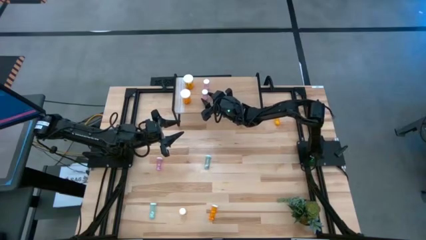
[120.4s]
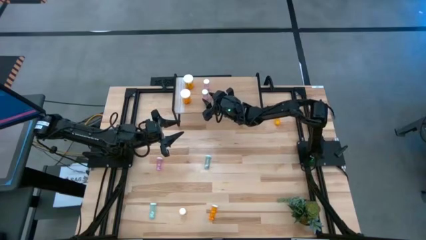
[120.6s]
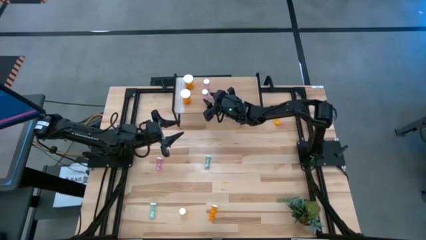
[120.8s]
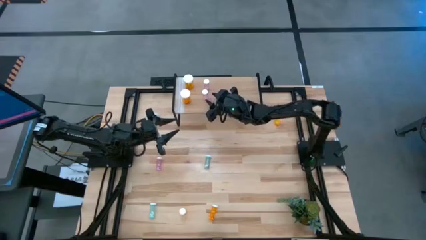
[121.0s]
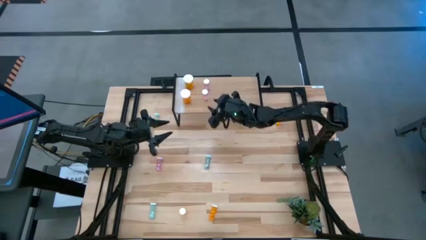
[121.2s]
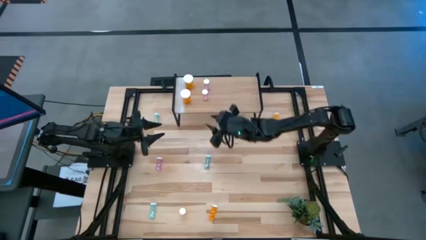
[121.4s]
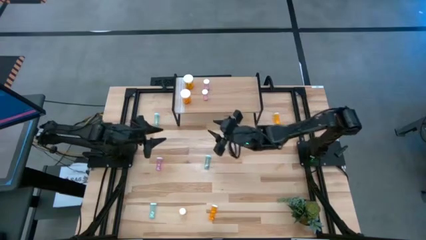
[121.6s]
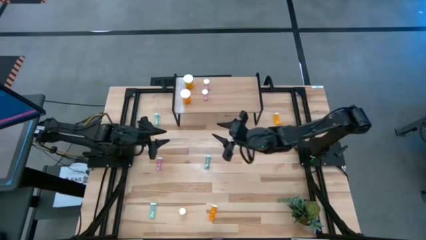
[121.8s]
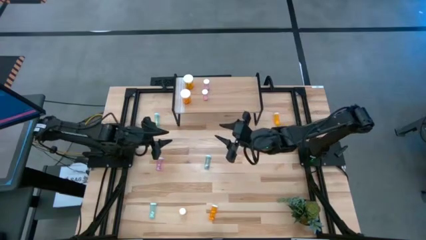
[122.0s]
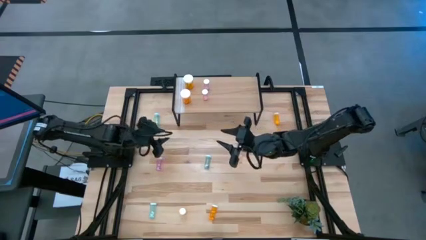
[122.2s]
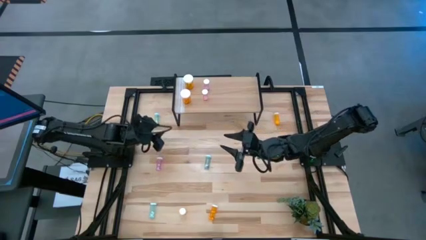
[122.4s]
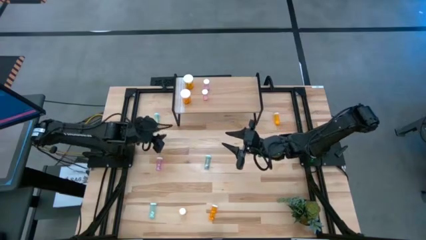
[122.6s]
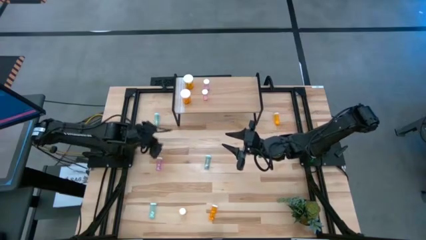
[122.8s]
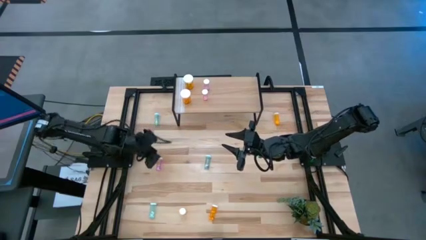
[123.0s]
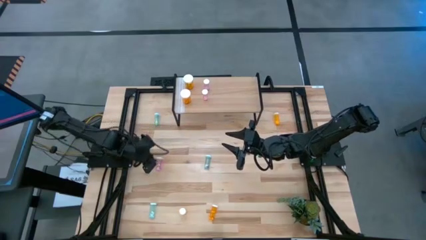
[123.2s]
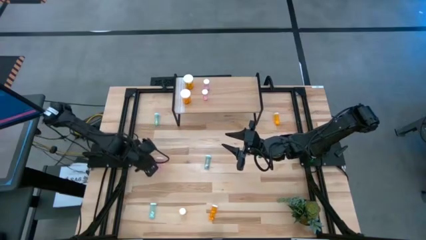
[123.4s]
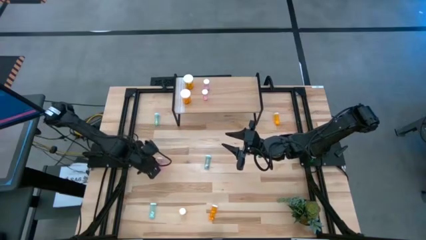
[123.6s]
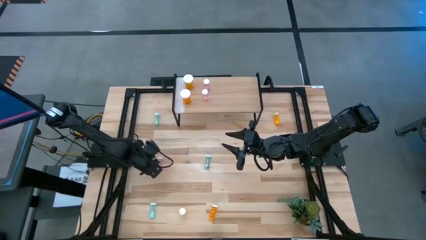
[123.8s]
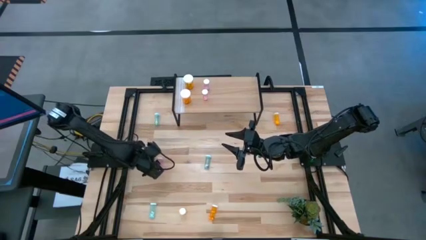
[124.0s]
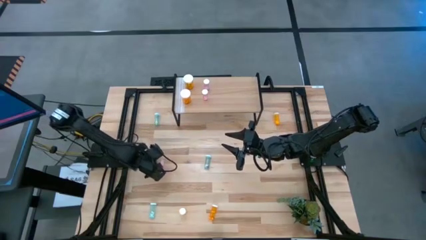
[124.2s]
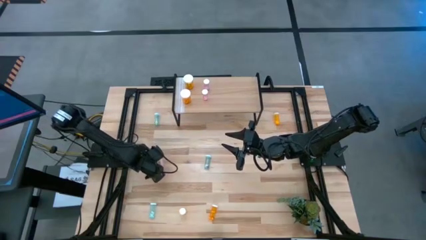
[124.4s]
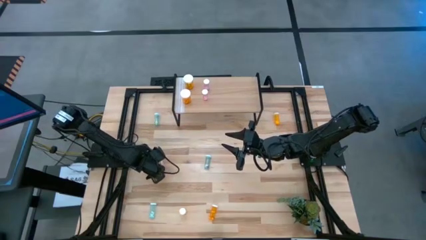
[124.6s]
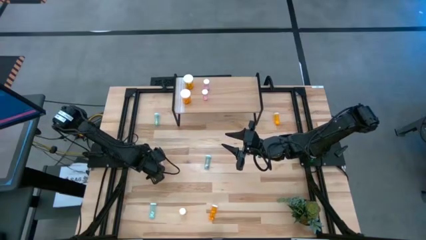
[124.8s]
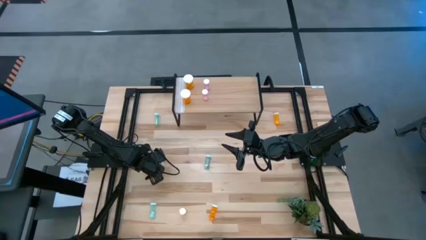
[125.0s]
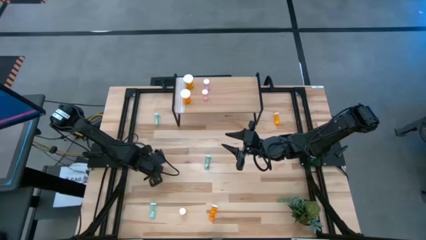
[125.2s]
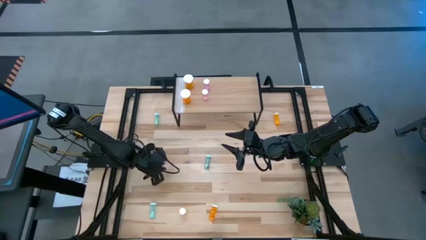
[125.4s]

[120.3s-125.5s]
Task: Pick and place medicine bottles onto shelf by color
Put the small pink pill bottle aligned with the other small pink bottles on the shelf

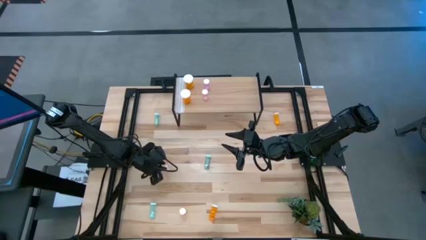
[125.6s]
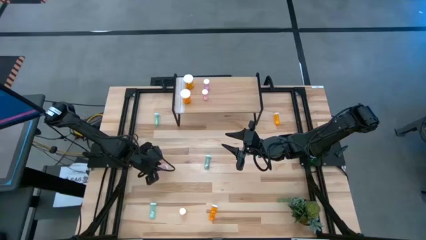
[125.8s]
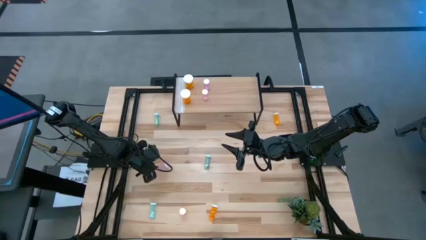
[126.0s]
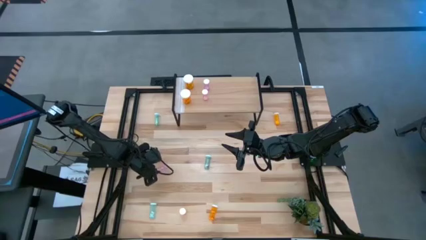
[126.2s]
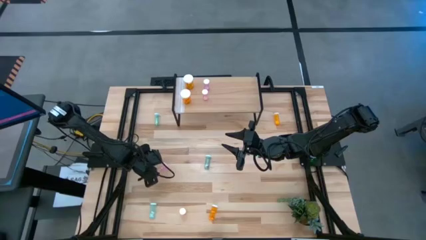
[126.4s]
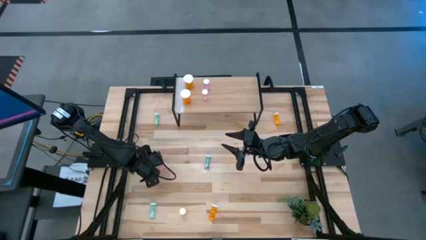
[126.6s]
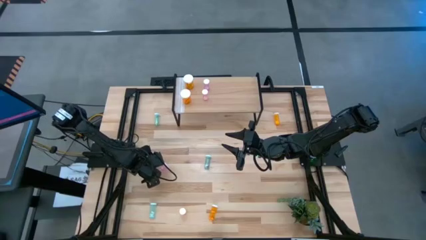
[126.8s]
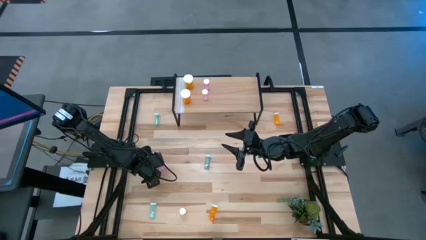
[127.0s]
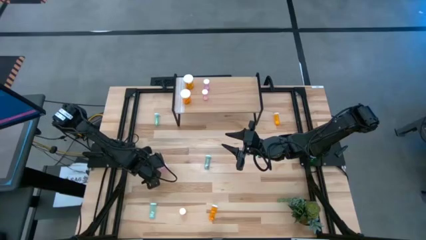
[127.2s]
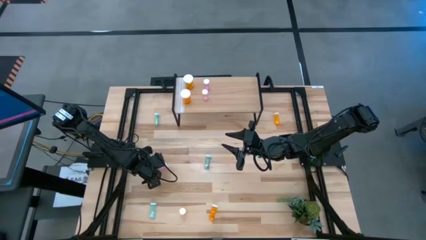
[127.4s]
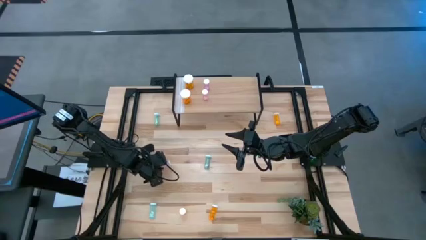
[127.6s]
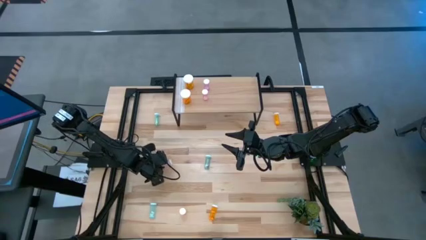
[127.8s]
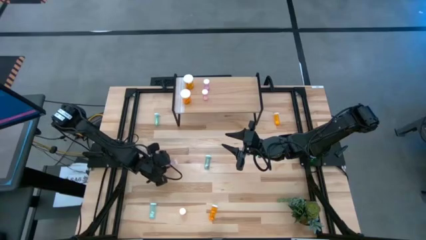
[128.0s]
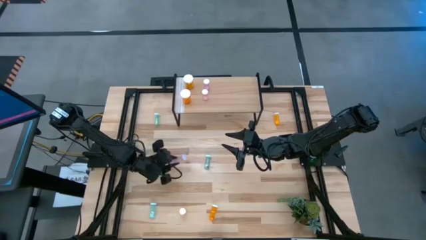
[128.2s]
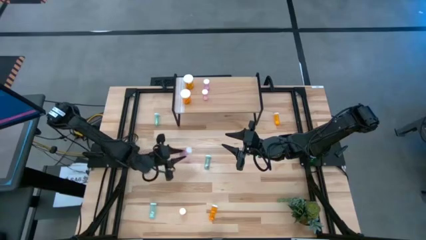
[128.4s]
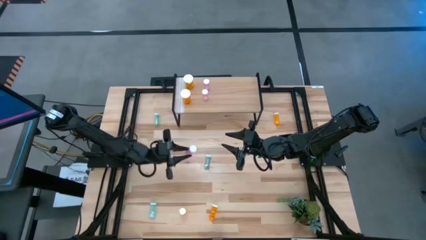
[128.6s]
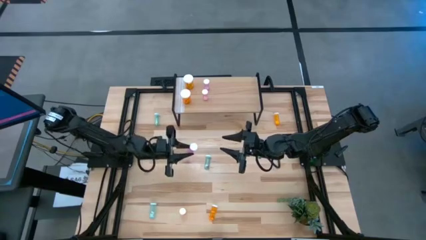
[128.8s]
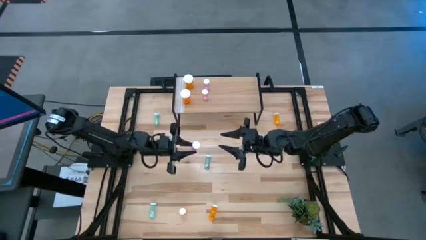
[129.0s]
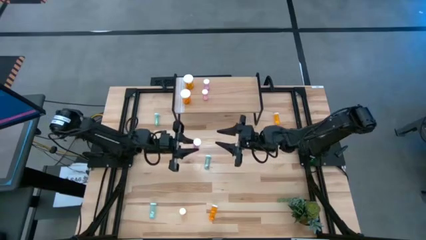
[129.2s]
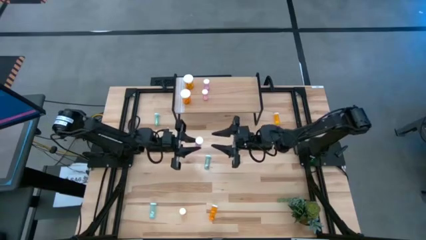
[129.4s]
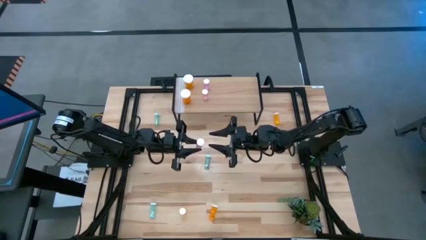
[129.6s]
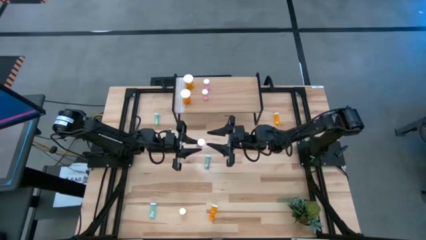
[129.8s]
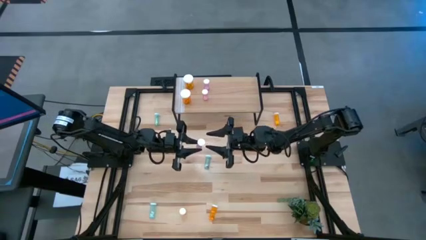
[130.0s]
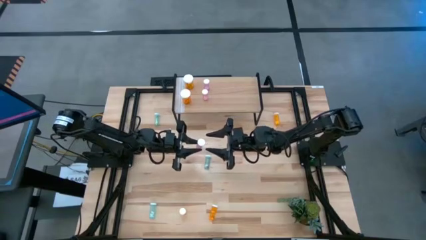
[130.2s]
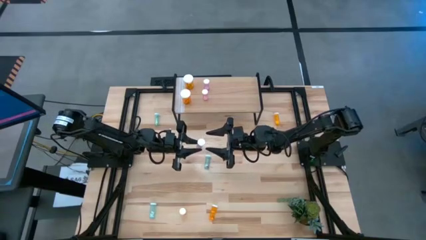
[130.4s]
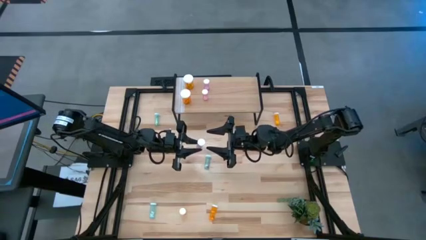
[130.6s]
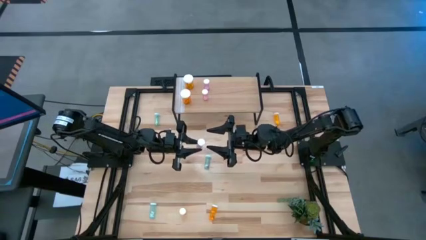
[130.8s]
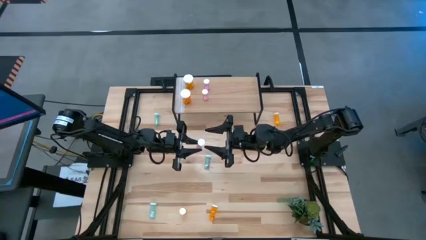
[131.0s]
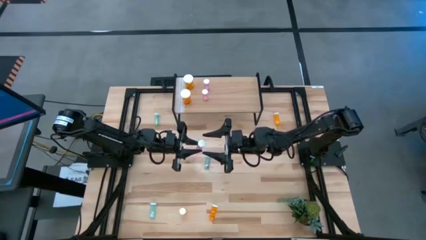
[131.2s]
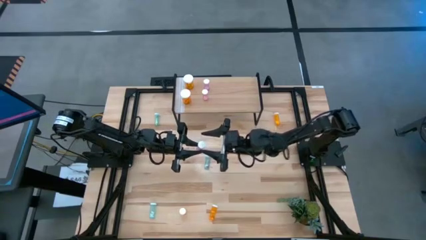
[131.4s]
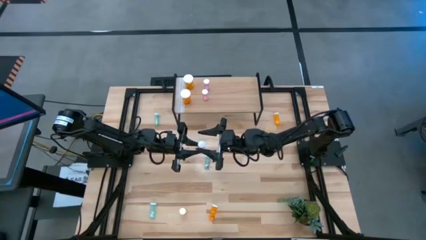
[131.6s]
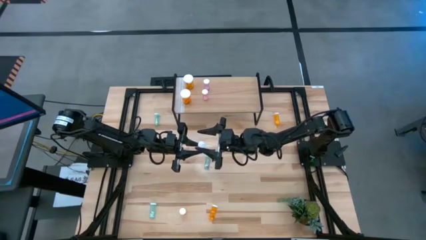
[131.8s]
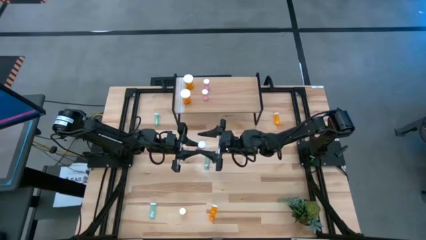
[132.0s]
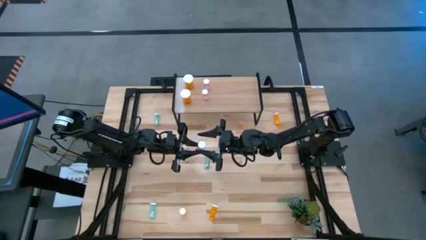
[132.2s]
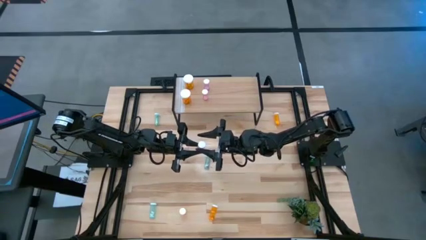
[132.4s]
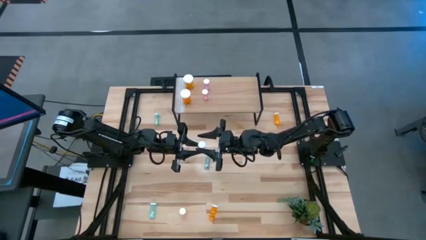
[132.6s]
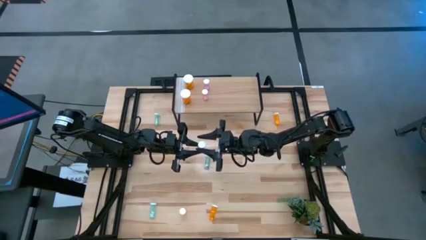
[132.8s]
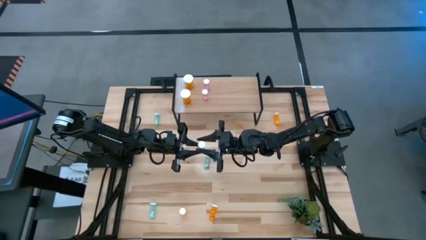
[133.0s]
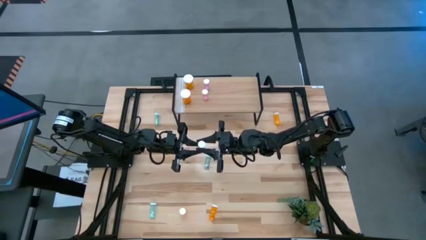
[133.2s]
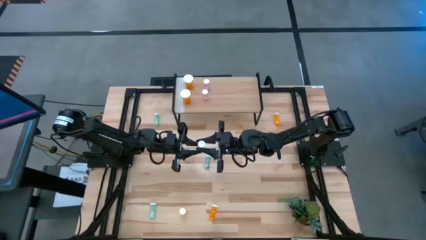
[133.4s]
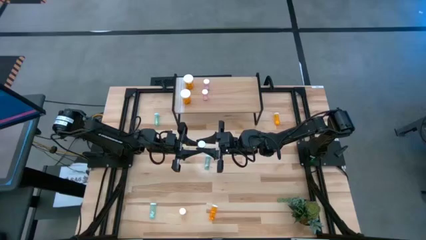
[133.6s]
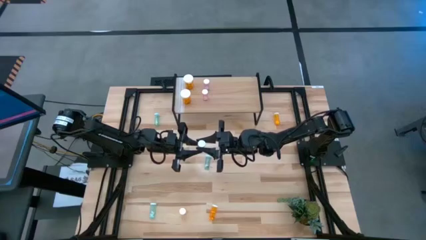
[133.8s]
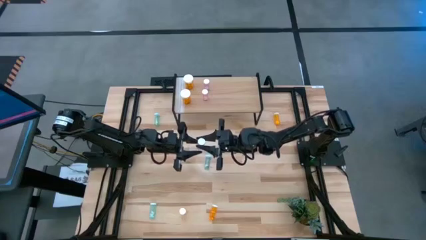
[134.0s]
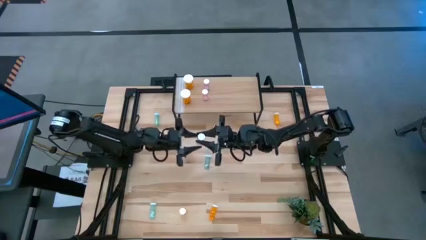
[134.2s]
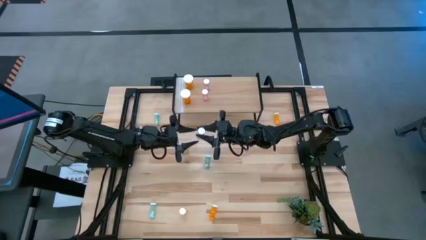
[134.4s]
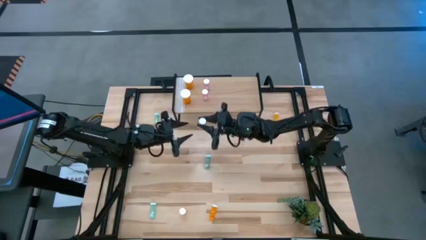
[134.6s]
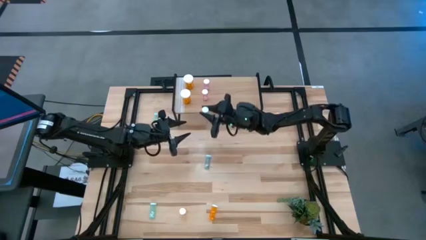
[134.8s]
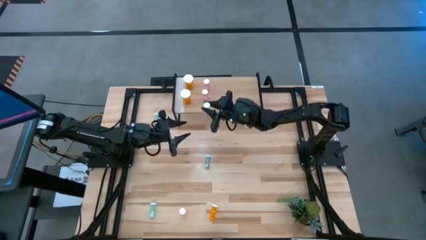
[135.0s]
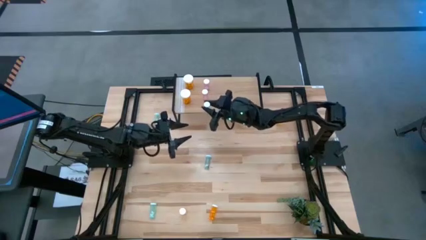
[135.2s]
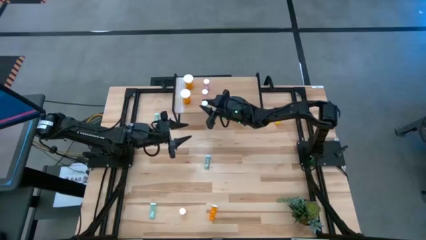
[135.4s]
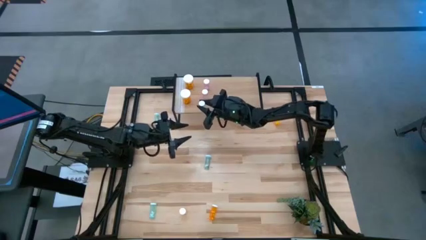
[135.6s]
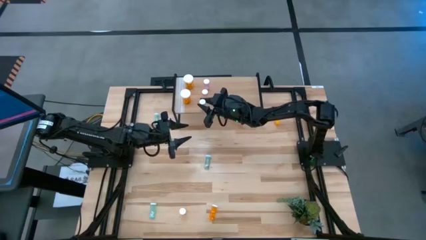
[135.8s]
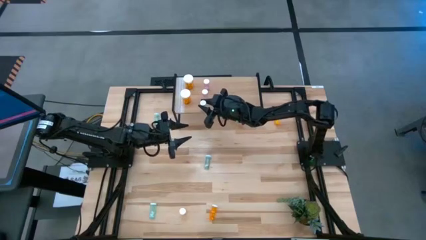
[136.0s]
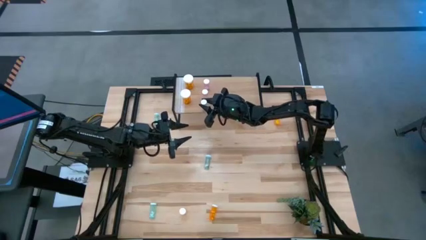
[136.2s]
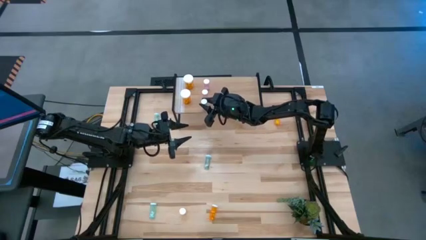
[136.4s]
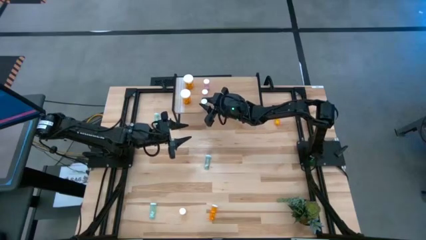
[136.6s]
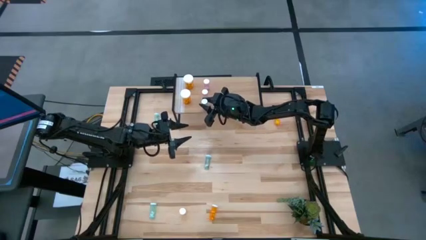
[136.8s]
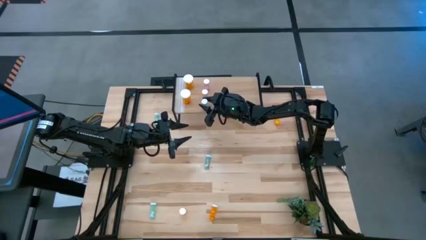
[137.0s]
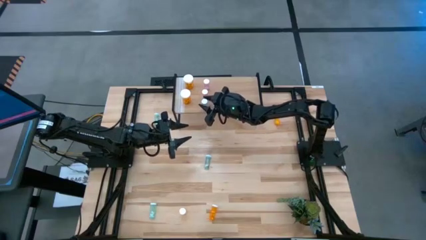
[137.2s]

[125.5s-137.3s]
Put the small pink pill bottle aligned with the other small pink bottles on the shelf
